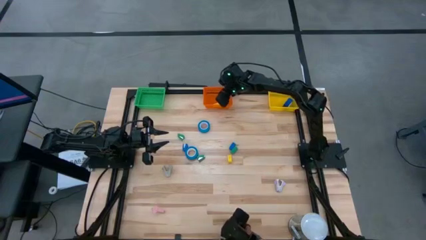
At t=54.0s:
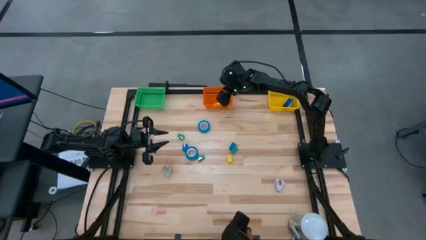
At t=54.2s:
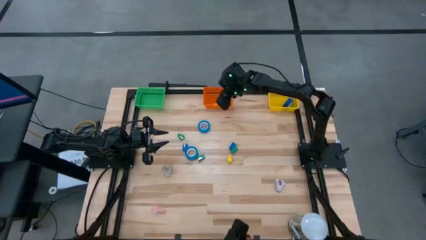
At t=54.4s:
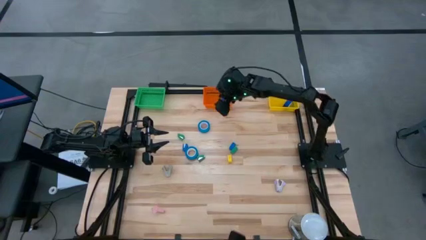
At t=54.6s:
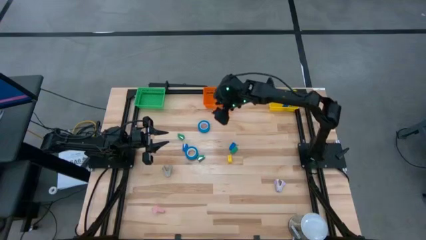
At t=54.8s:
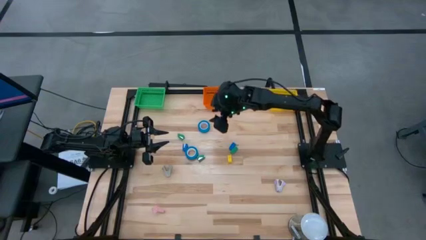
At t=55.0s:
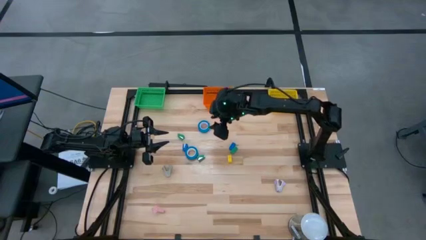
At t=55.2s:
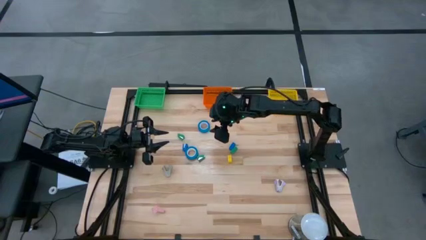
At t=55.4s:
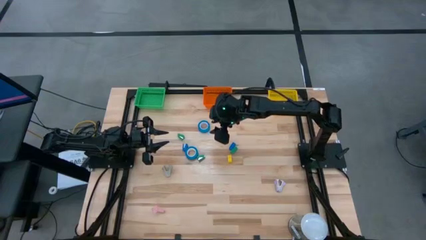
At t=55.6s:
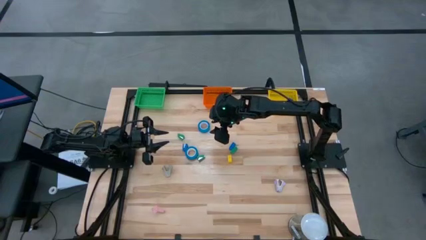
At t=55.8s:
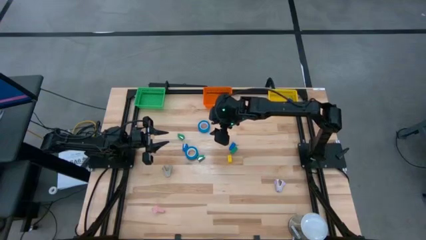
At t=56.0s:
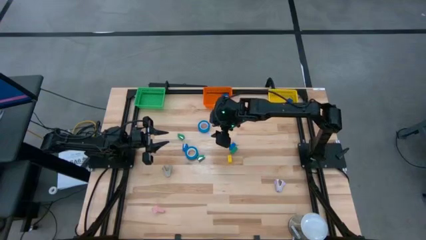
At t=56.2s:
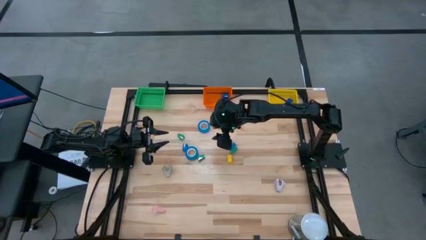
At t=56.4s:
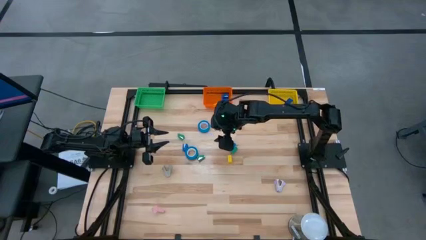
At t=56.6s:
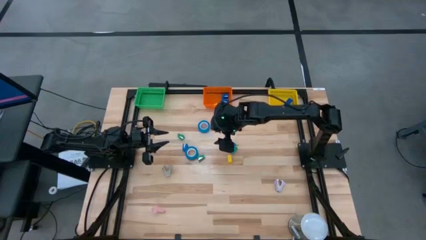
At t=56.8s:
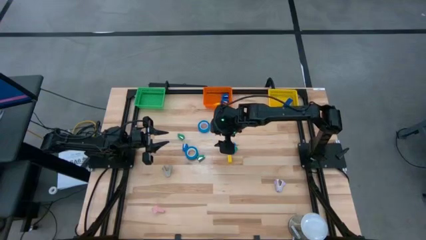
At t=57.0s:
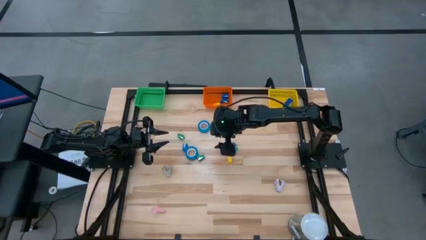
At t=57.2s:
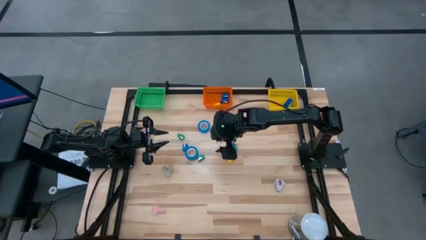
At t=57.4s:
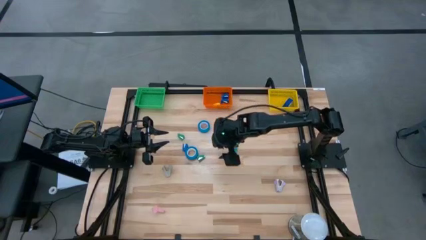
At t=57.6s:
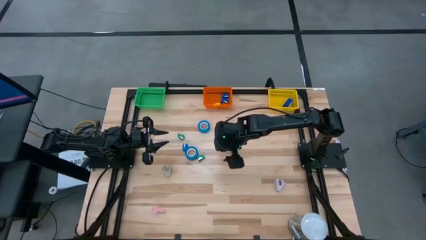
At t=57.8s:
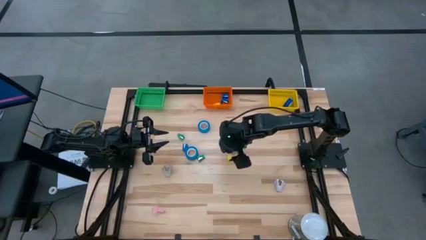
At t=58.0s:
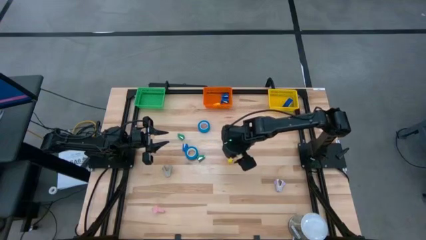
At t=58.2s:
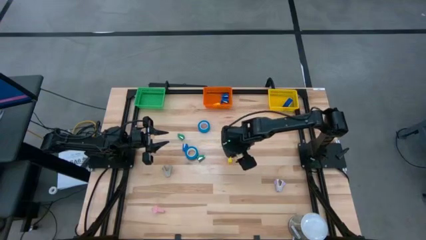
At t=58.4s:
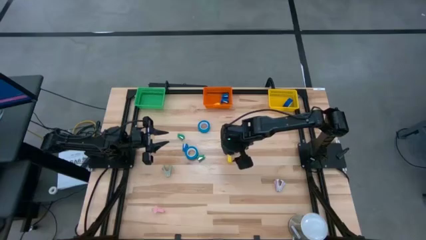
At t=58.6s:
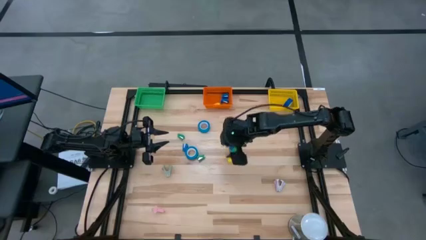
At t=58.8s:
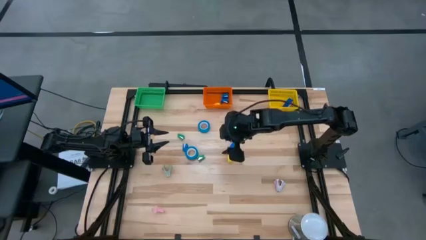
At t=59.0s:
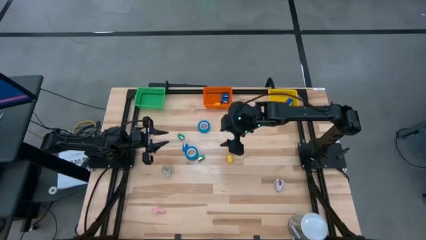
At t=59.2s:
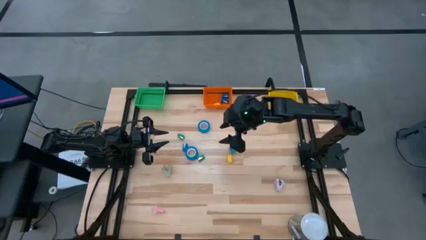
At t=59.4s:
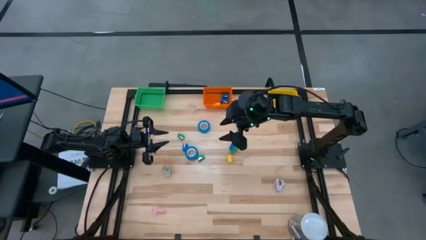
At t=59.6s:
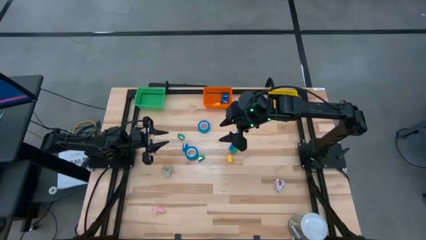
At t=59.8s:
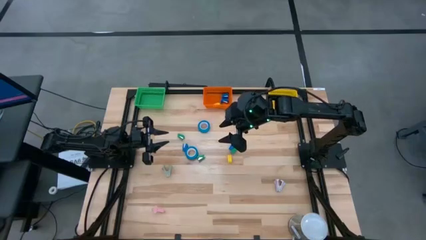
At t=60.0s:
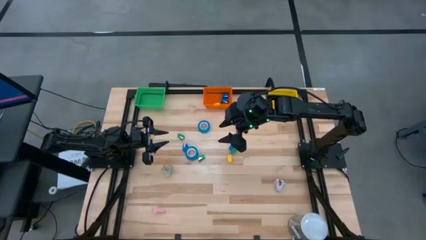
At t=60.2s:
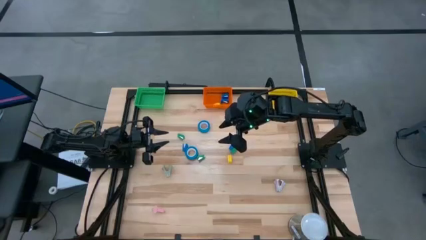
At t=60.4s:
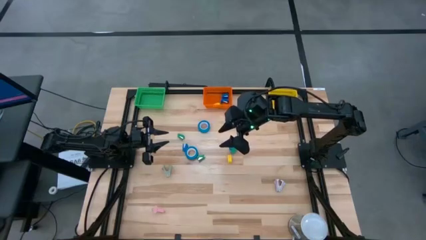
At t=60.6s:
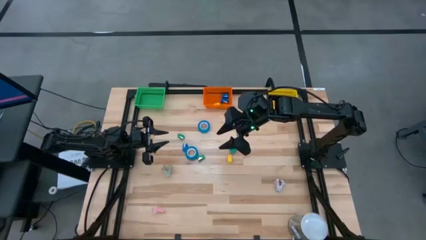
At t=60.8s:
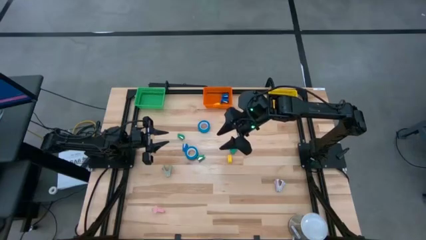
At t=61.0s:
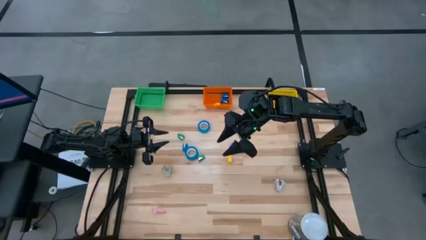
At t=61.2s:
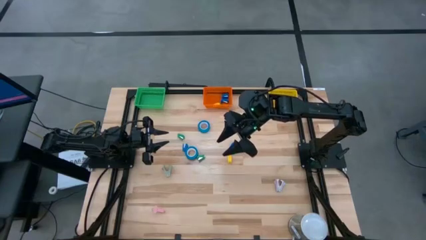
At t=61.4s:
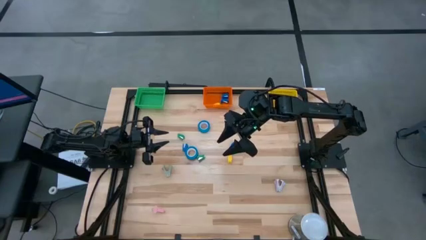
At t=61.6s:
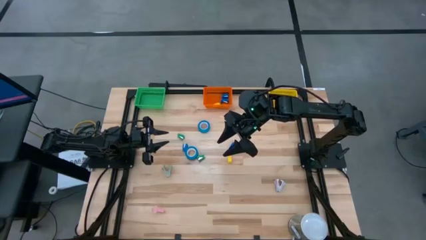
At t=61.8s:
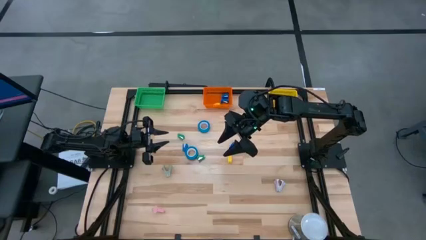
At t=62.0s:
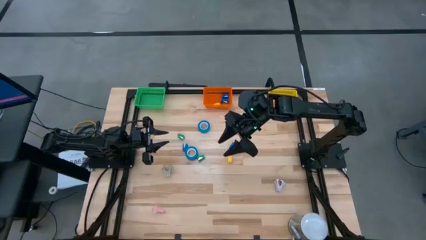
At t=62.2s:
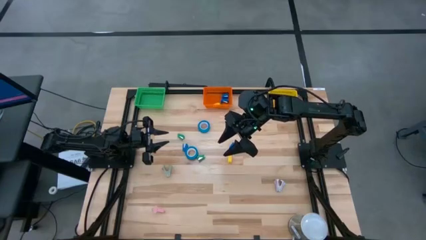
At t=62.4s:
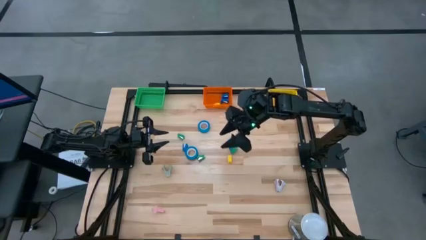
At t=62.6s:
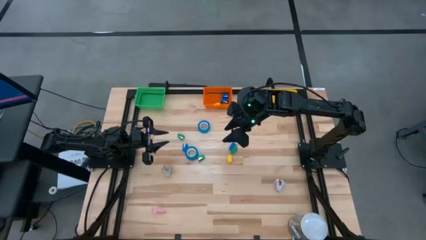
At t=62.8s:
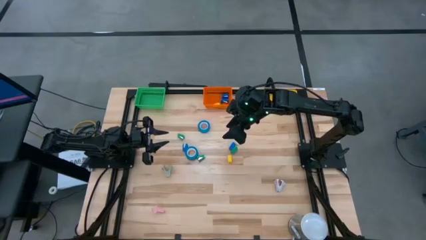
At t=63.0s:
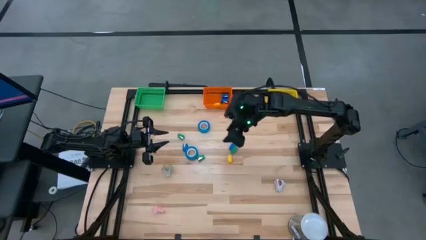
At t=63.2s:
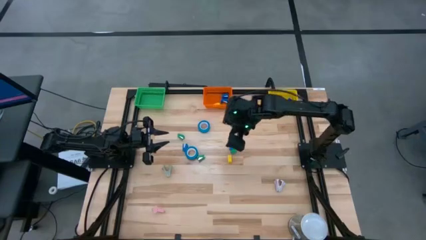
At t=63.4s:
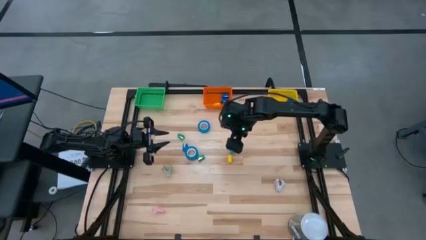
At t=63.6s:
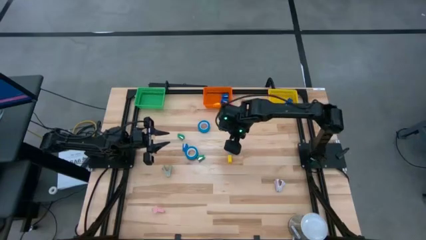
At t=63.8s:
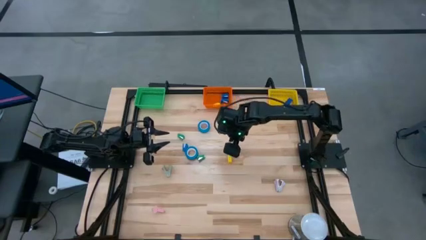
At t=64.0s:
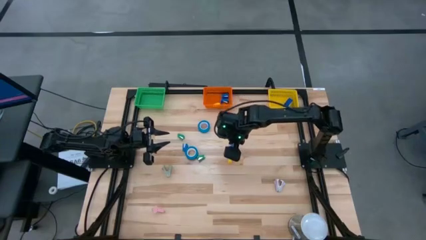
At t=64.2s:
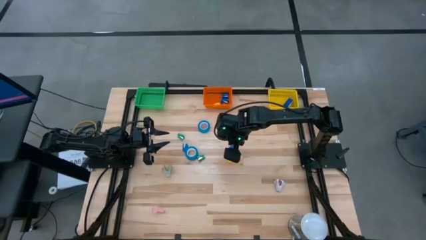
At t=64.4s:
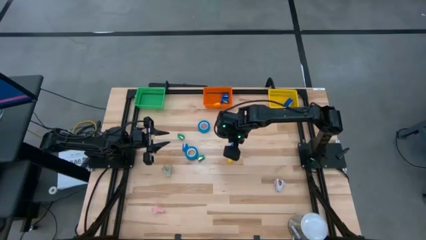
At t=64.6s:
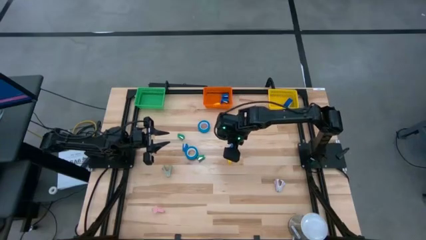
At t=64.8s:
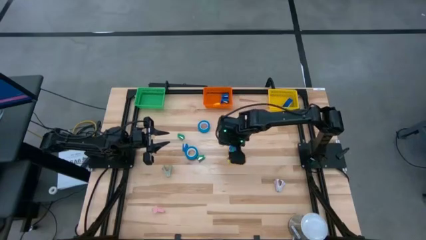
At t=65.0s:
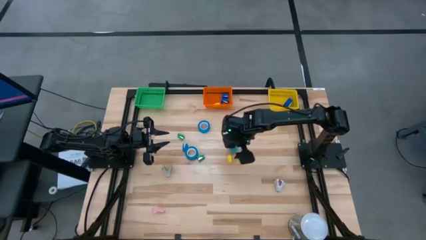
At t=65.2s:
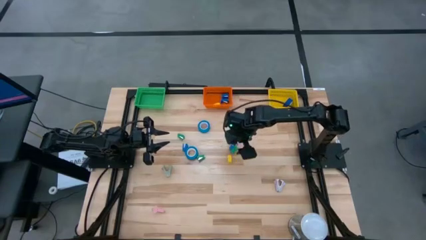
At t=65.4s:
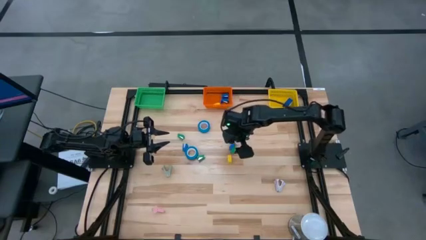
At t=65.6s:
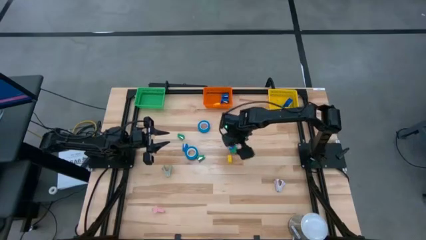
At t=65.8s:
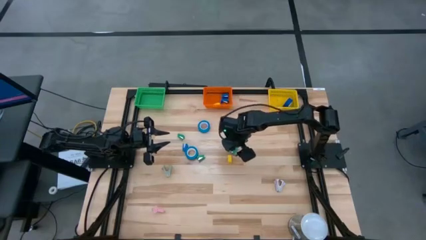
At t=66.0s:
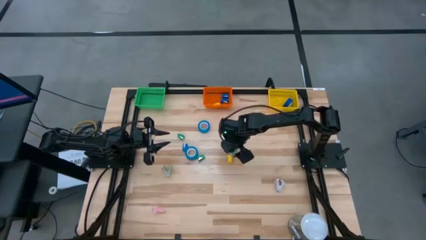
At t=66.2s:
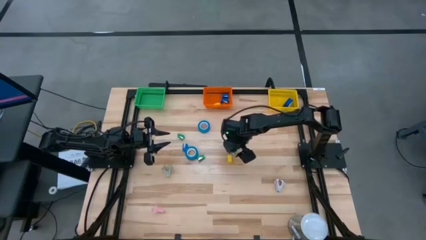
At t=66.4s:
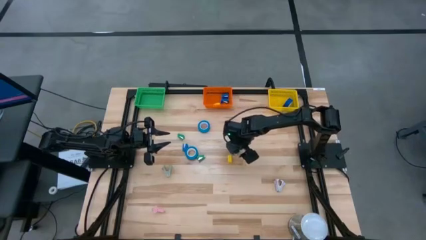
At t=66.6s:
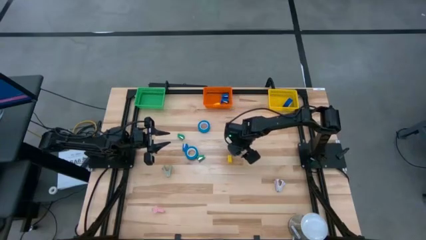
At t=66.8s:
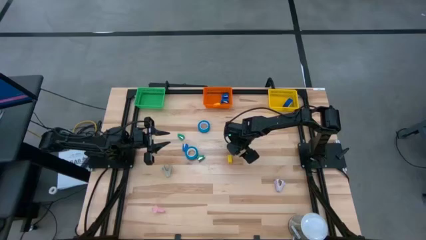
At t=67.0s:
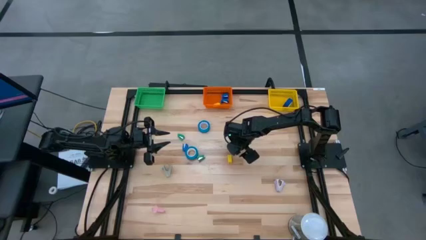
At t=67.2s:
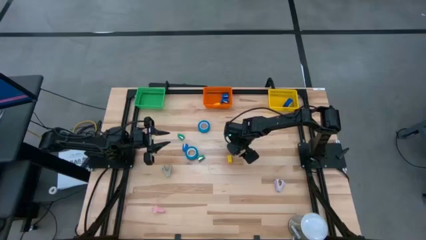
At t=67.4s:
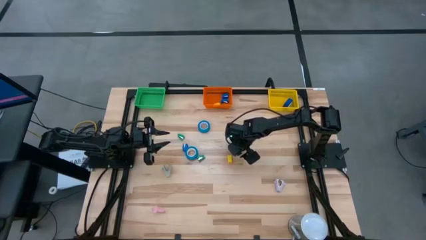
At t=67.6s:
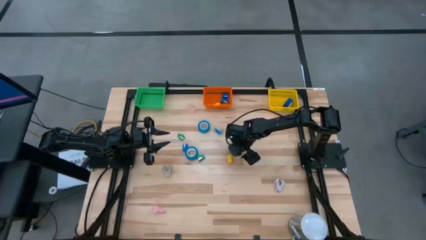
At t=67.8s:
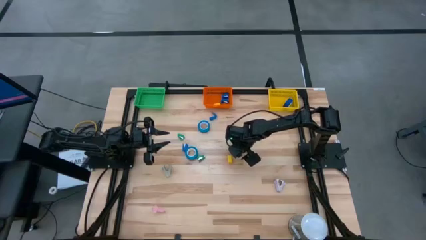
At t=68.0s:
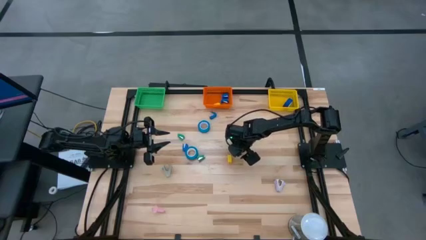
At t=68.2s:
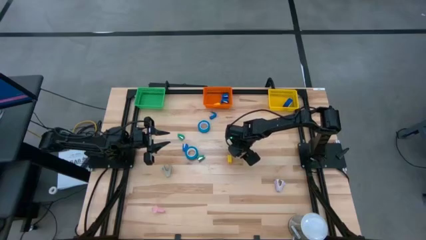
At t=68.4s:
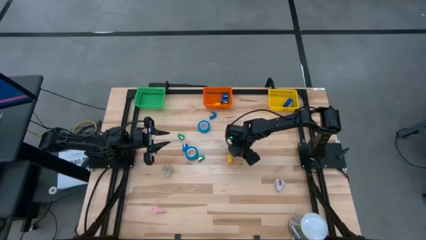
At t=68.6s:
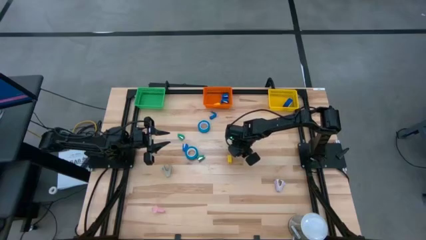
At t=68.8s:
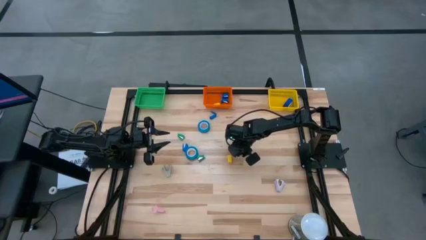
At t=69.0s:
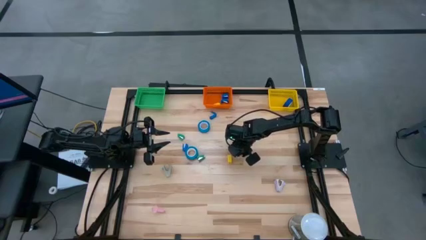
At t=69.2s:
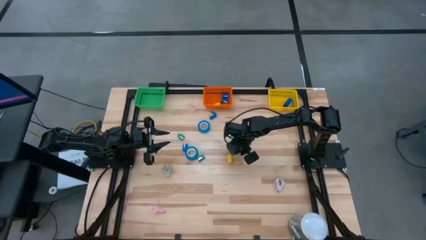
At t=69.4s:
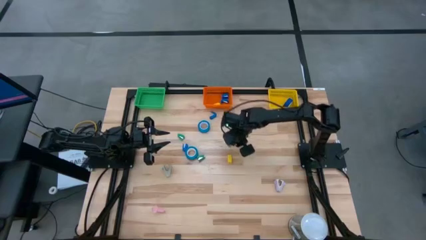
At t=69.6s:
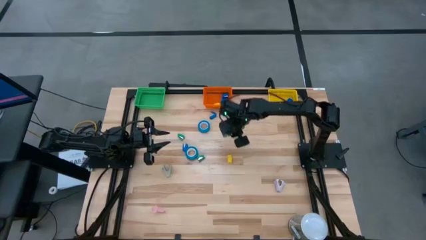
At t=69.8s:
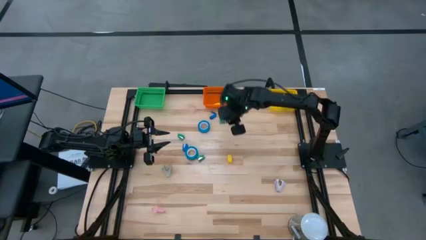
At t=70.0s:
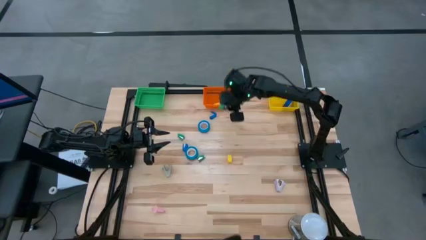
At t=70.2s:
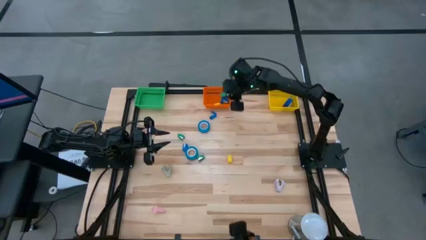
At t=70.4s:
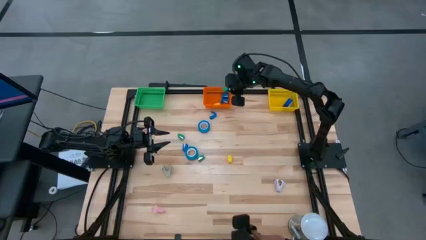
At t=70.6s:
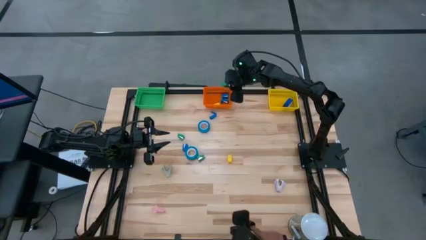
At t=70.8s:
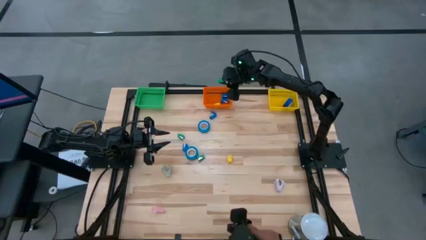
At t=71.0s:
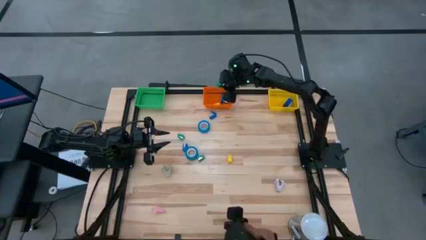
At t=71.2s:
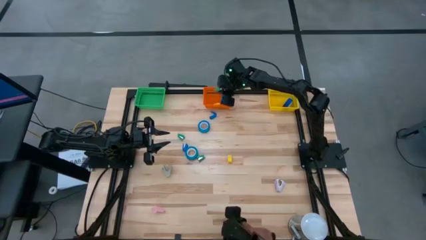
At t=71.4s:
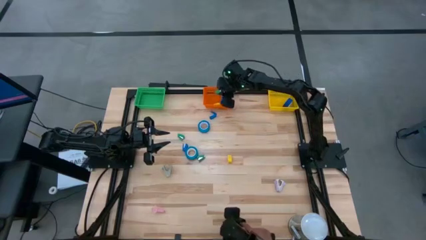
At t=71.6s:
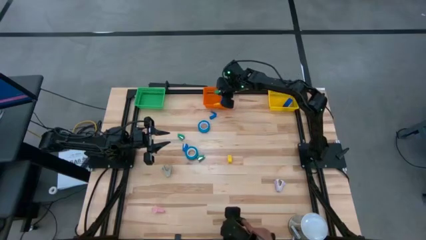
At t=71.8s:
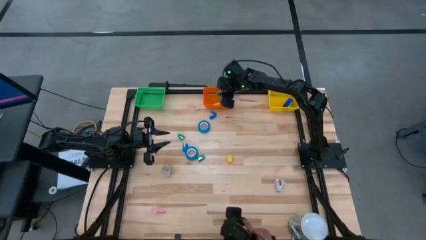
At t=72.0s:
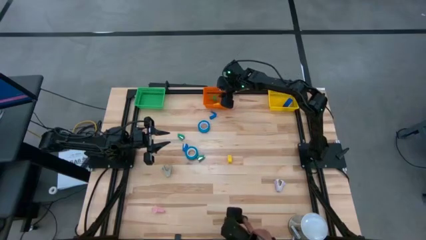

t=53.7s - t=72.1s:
Task: Pick and place Stapler, Stapler remover, tape
Put the green stapler into the orange bin
